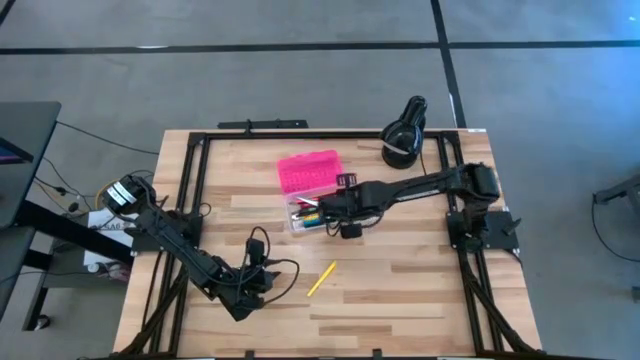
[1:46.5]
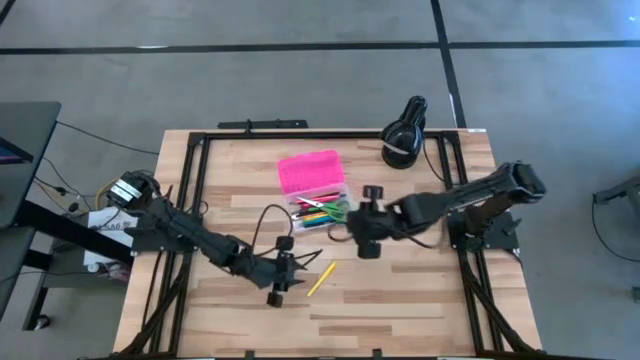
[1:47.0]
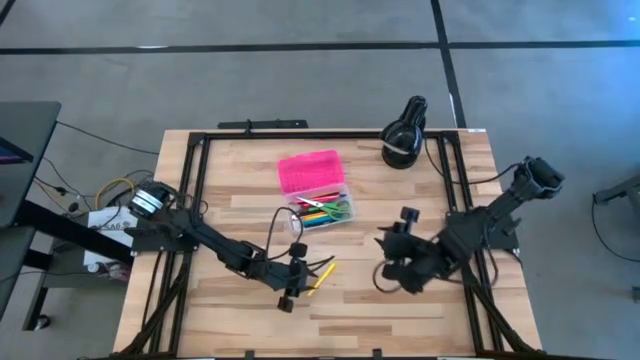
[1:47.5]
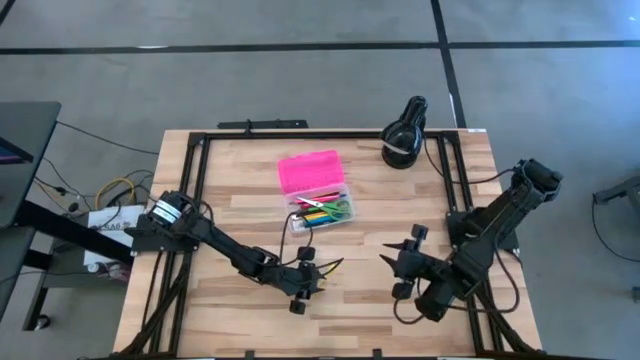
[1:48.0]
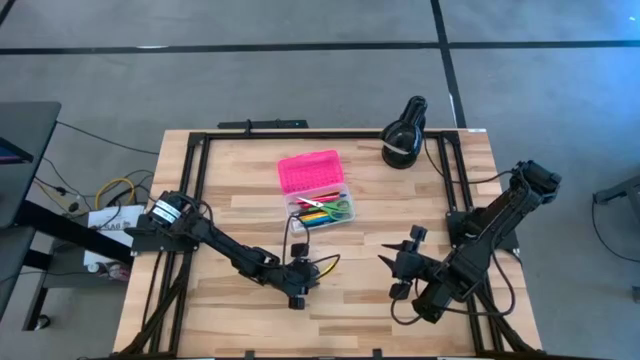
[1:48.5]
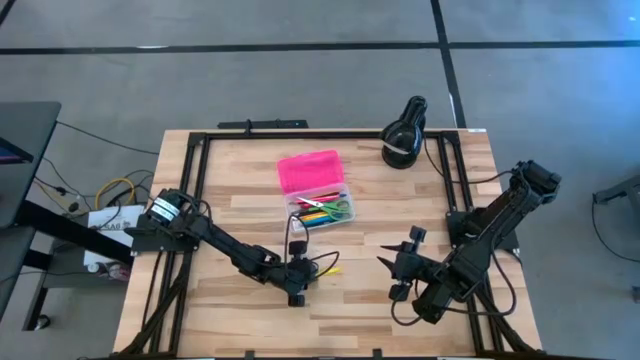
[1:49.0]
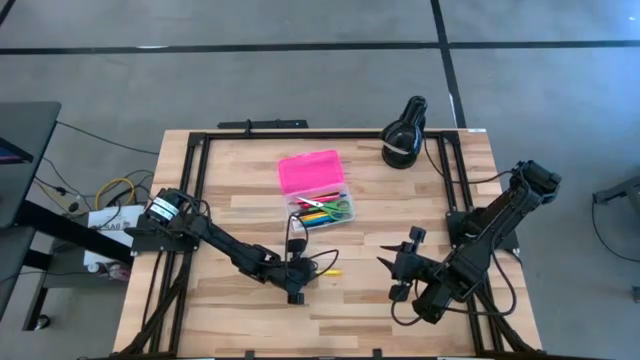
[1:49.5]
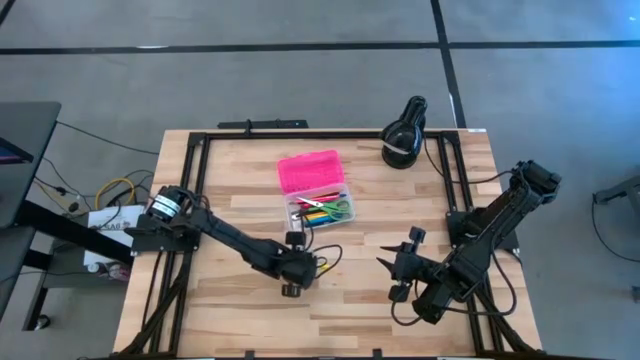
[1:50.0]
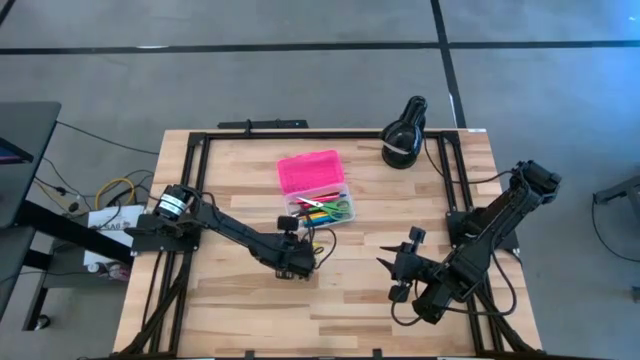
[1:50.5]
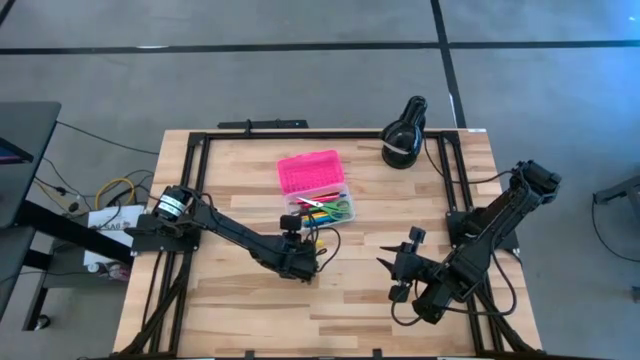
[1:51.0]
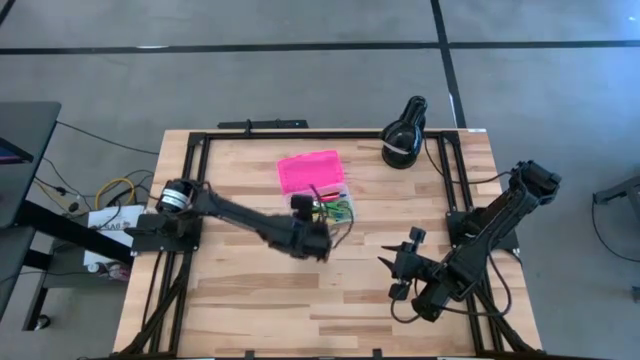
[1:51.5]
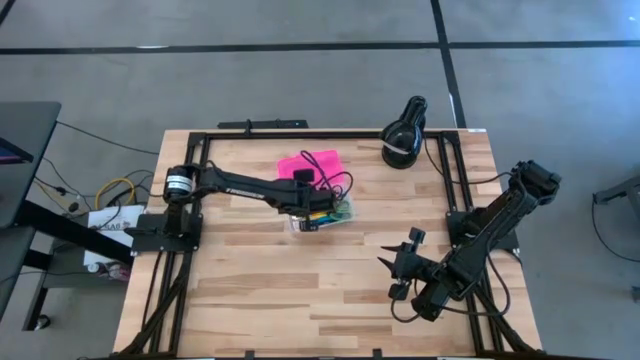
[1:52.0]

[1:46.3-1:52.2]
Task: Pick & place school supplies into a supply box
Put the yellow pen into the black supply box

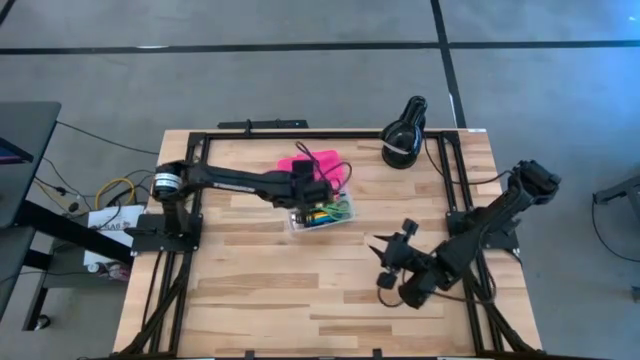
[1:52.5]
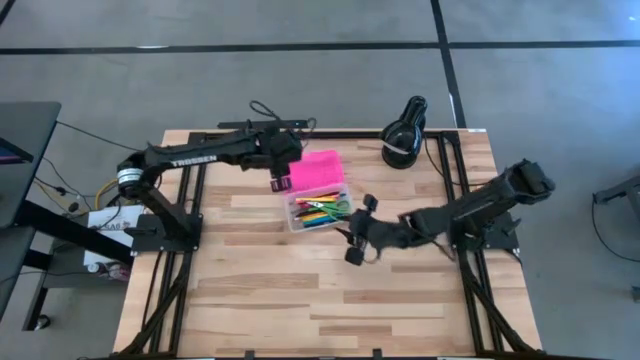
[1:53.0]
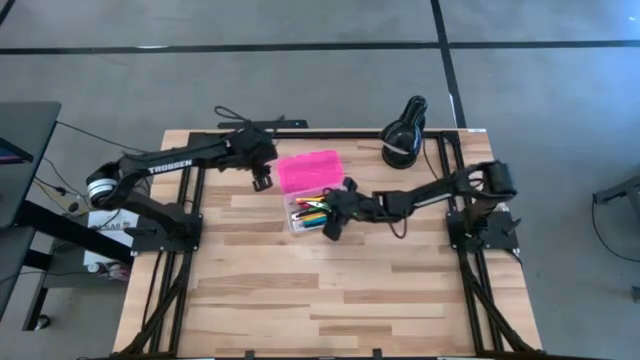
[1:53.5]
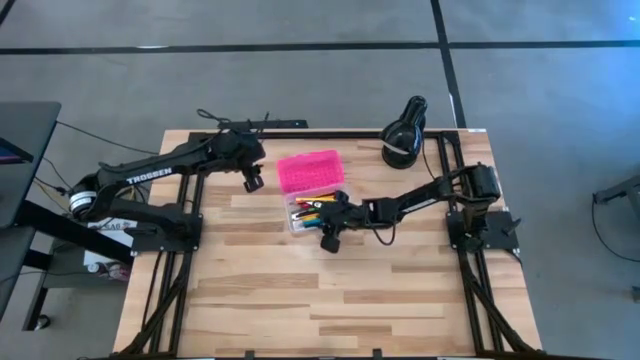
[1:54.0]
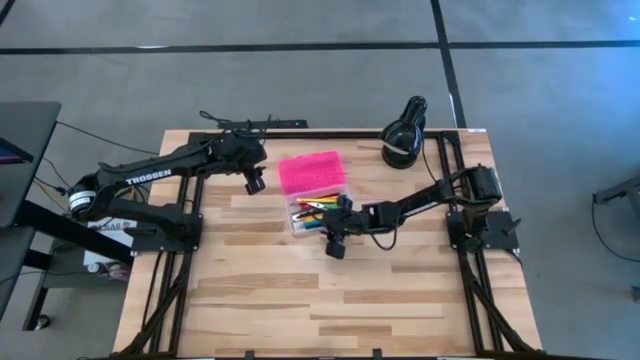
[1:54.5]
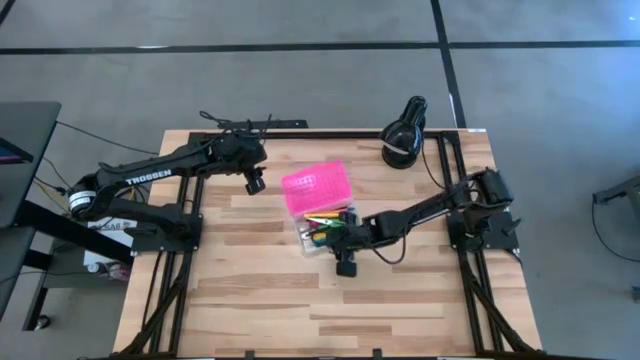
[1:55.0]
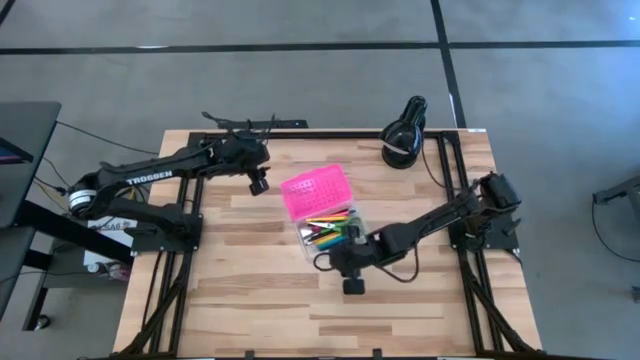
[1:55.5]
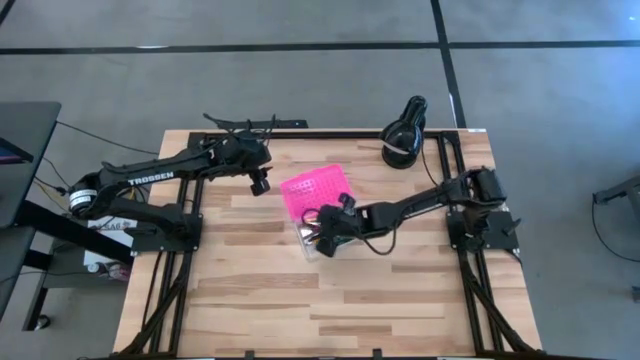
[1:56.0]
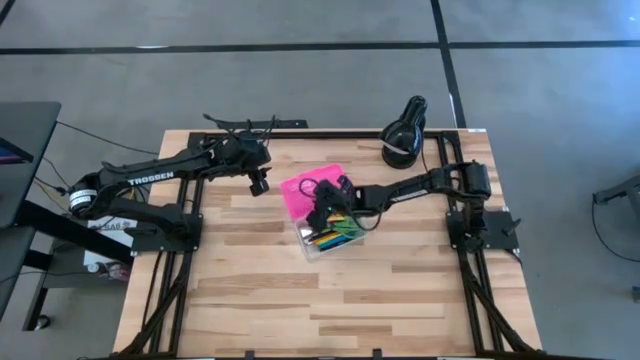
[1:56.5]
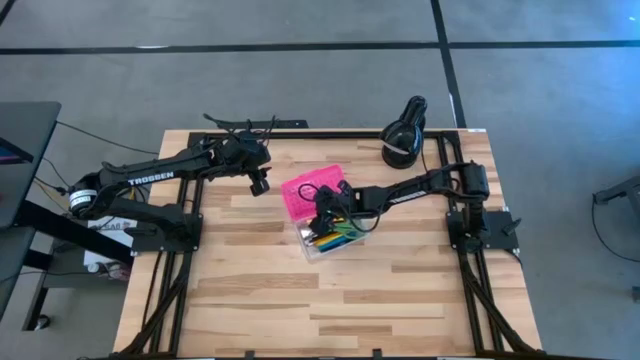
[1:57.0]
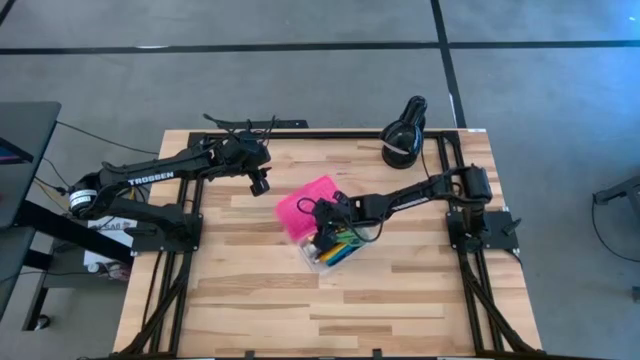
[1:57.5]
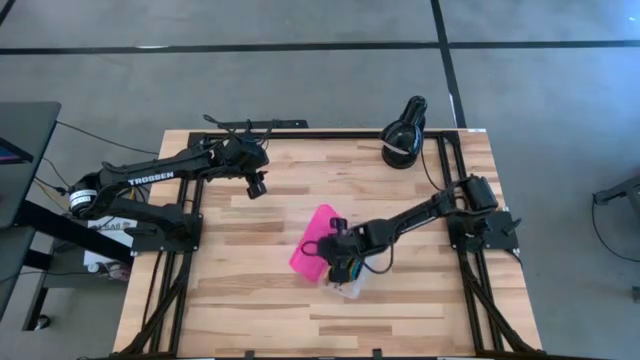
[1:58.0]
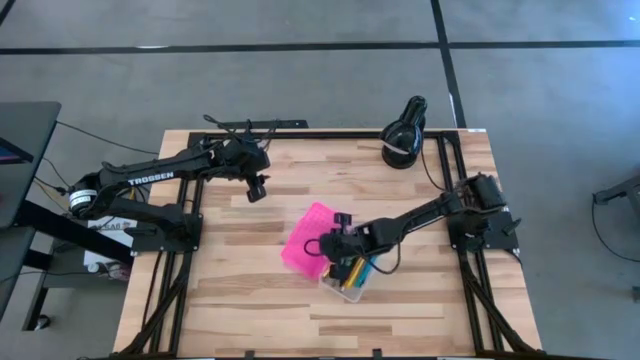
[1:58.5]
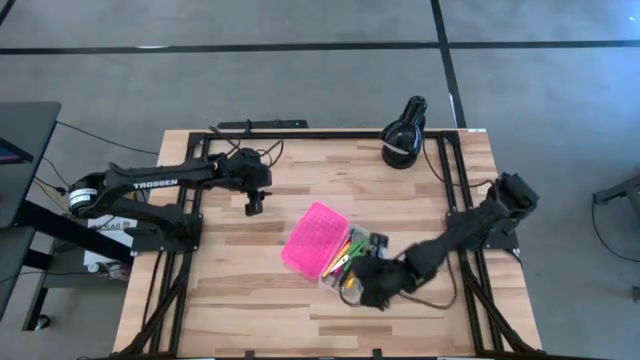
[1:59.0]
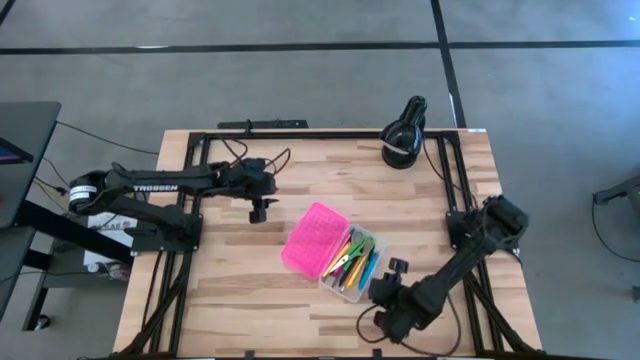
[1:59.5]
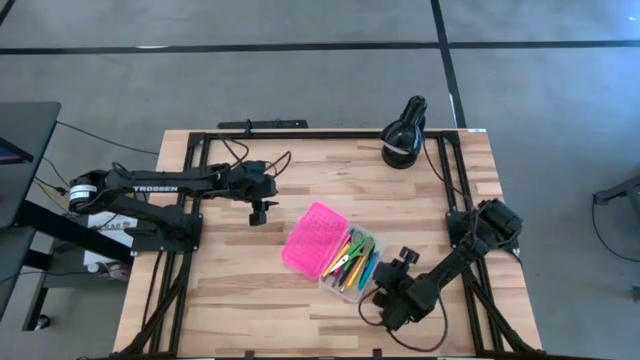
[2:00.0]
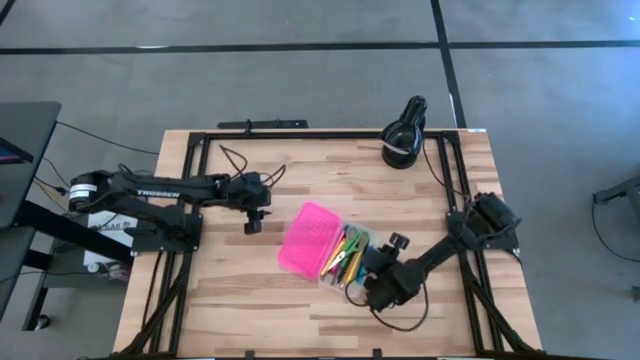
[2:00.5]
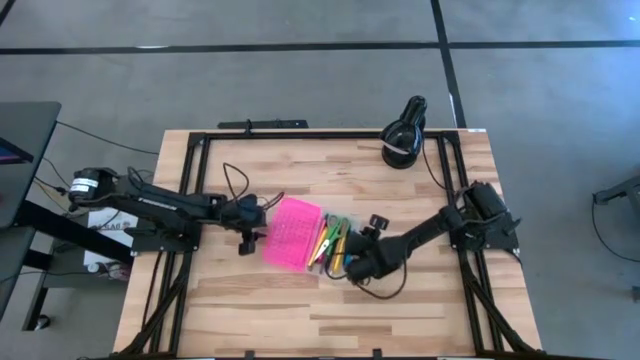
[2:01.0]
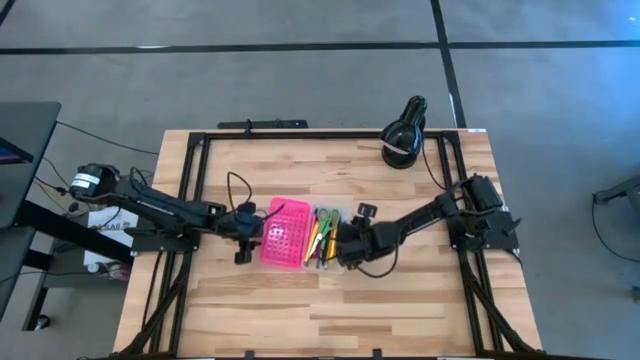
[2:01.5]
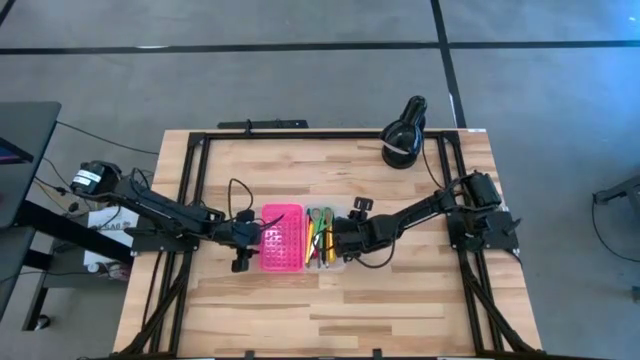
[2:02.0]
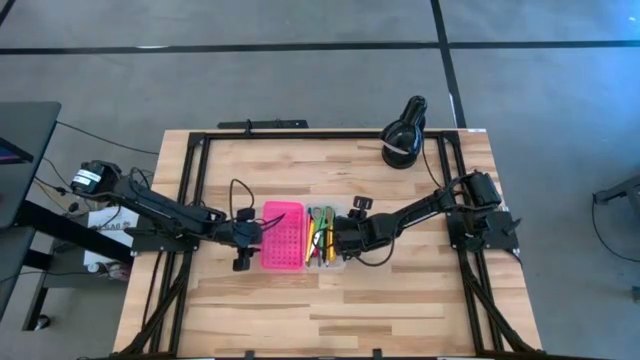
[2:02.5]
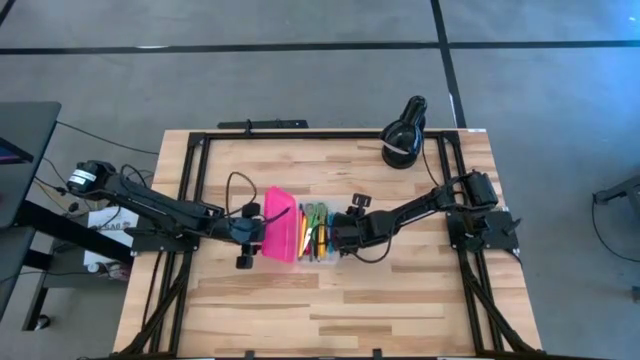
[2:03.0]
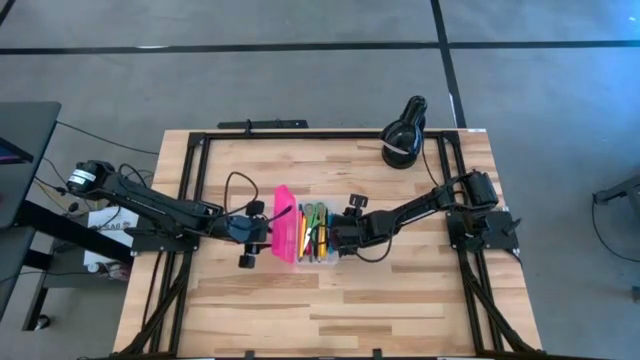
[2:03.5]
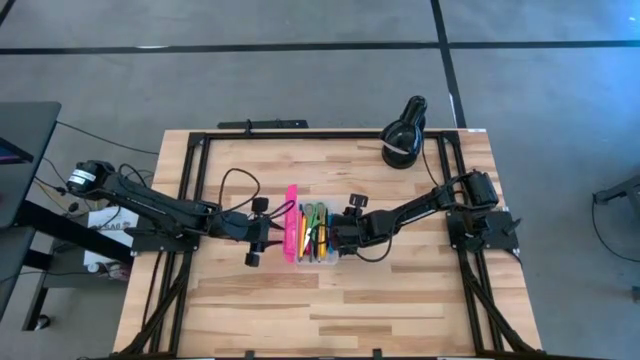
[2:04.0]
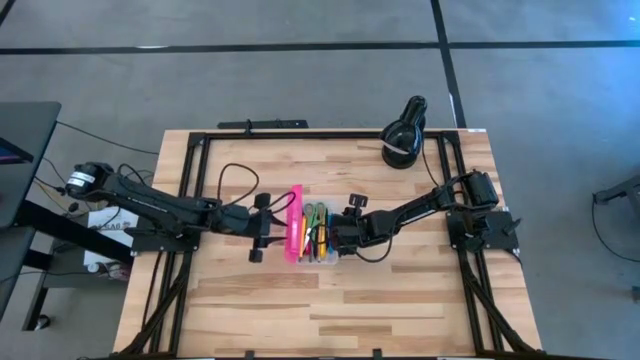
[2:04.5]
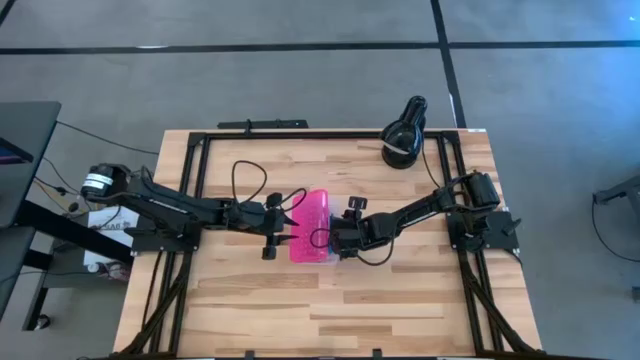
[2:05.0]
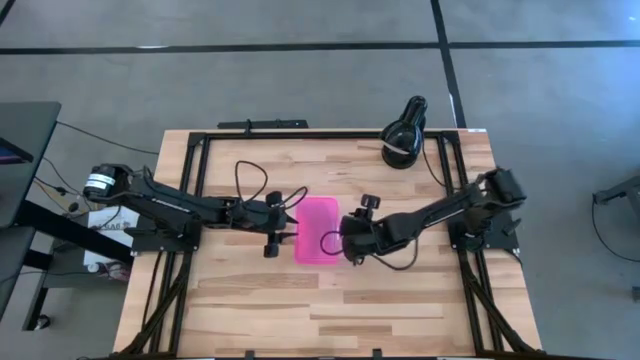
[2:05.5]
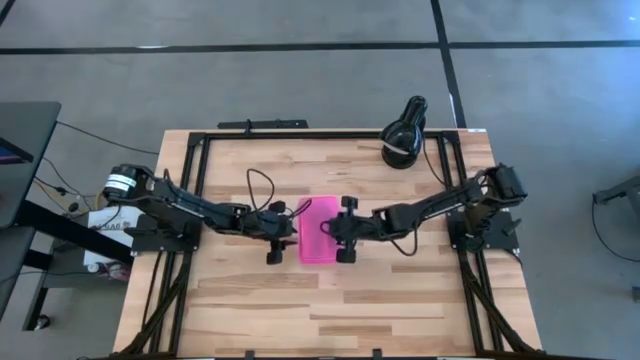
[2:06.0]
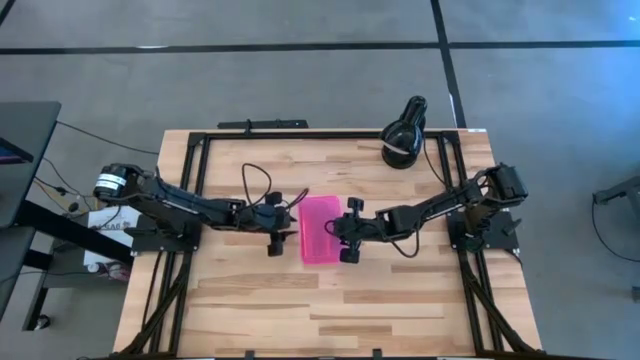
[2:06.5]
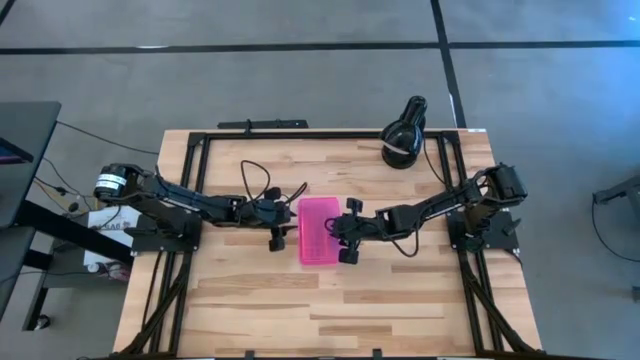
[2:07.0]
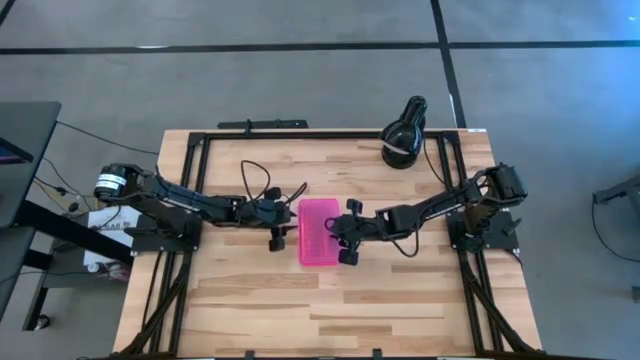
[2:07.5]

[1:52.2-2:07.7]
Close the black supply box

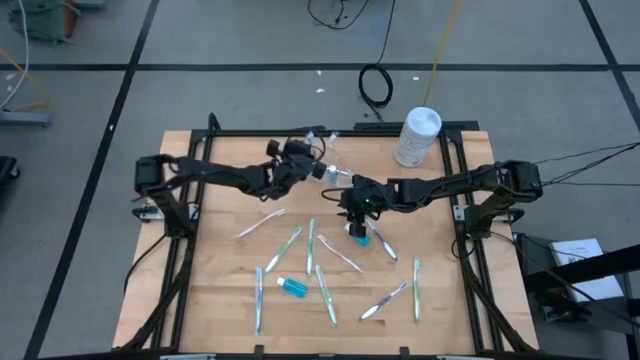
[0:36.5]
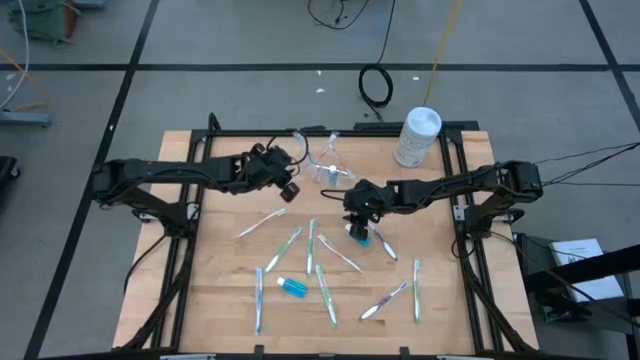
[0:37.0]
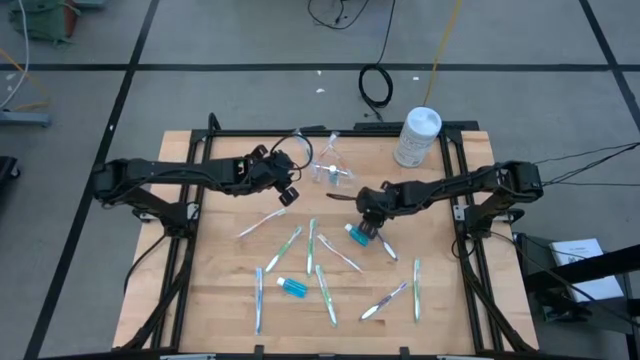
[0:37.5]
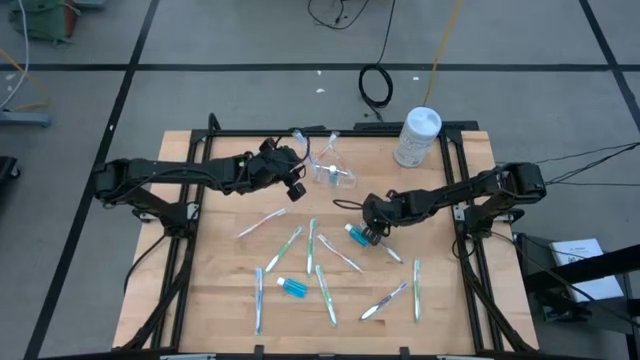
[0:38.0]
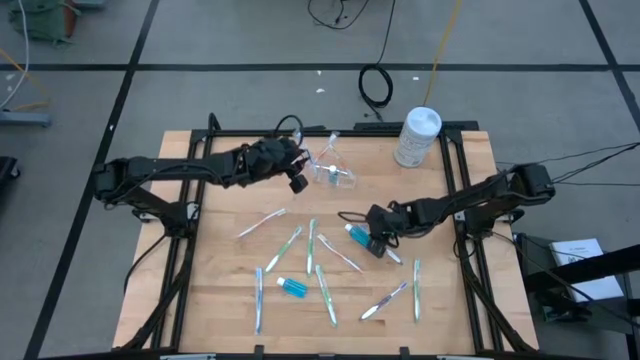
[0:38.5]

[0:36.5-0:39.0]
Task: Pick & Place toothbrushing station
Put the purple toothbrush into the transparent organizer
